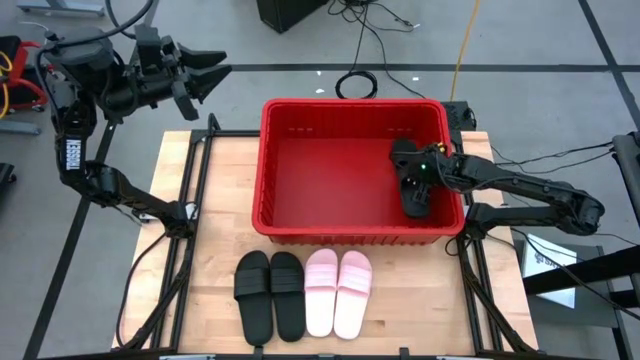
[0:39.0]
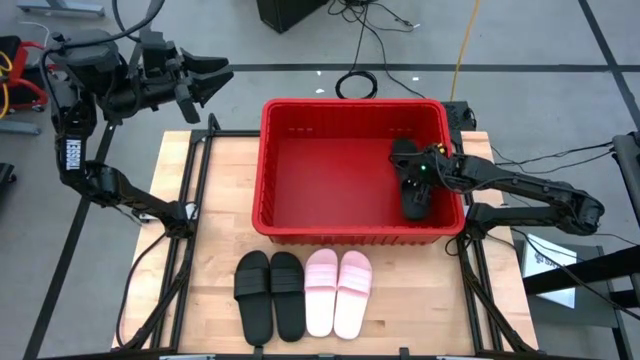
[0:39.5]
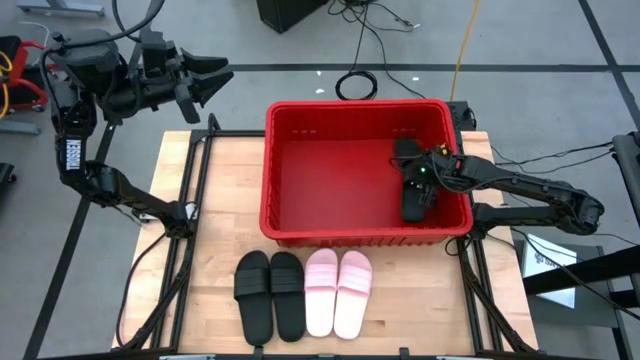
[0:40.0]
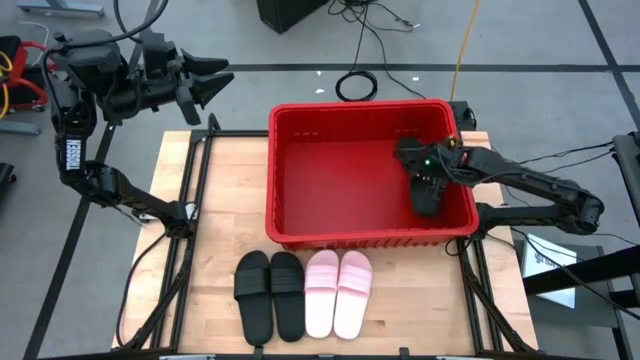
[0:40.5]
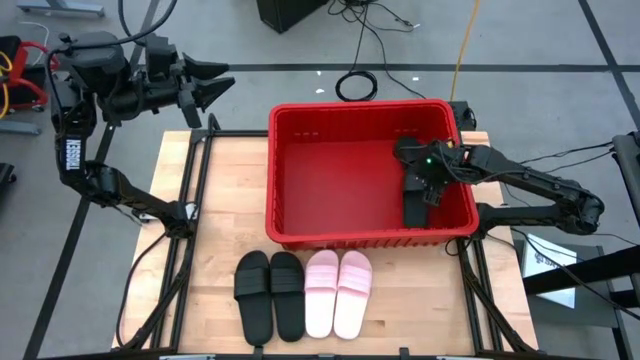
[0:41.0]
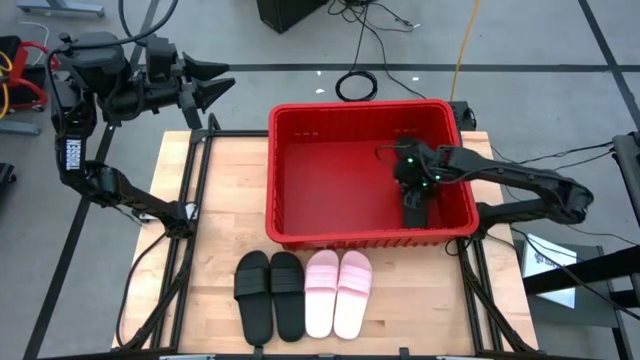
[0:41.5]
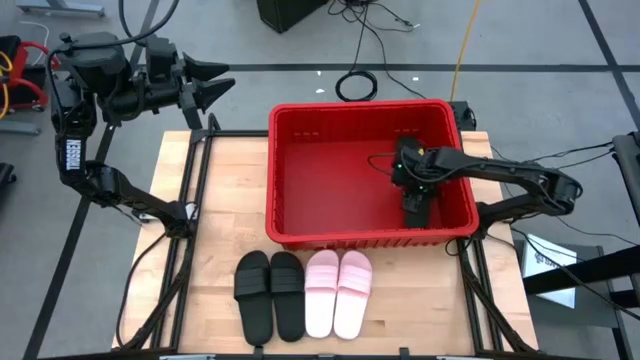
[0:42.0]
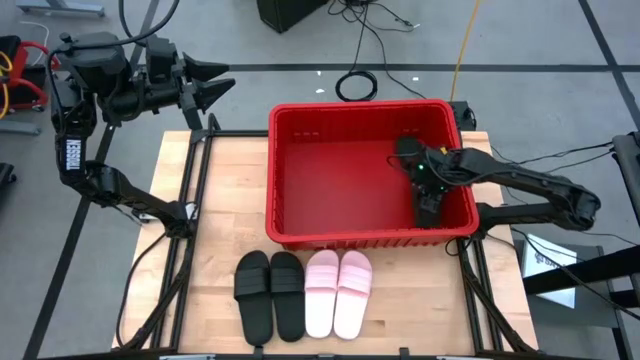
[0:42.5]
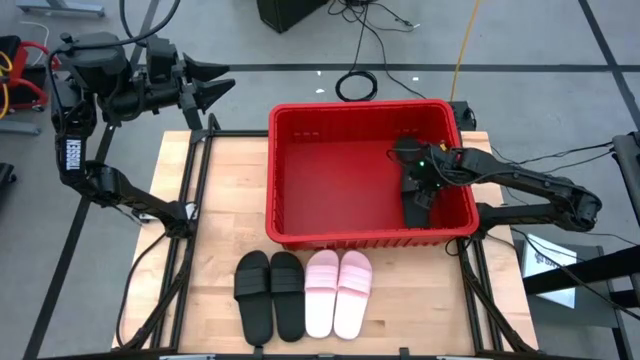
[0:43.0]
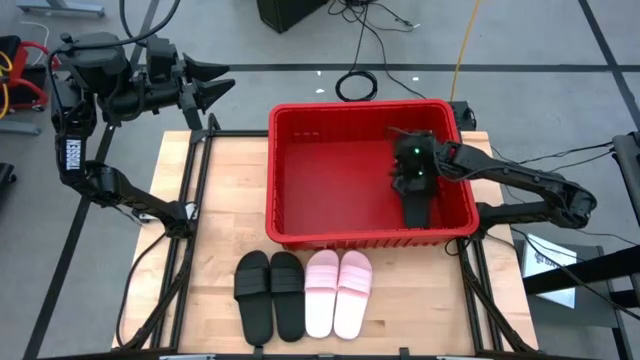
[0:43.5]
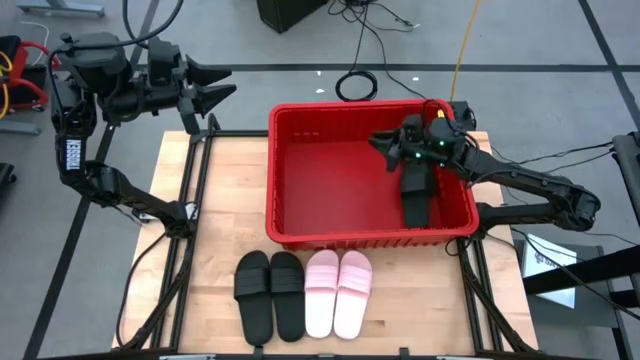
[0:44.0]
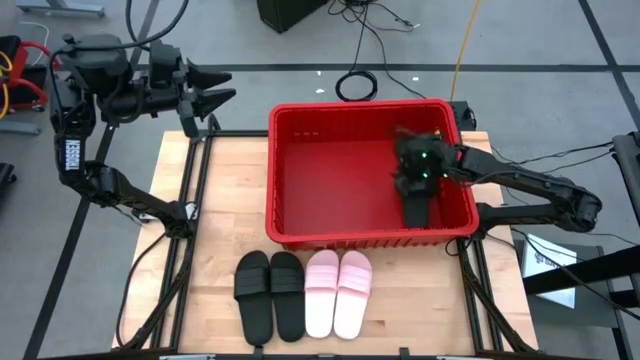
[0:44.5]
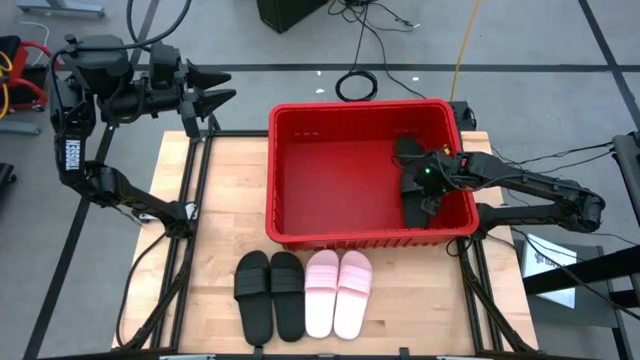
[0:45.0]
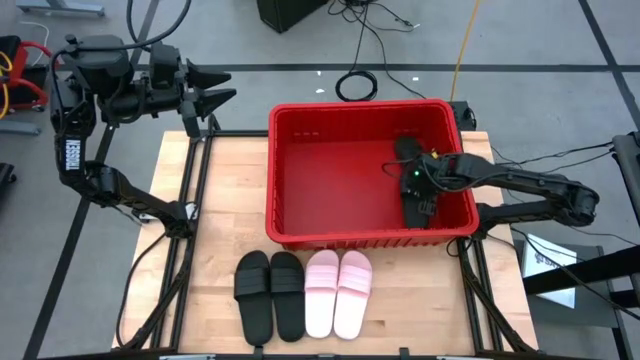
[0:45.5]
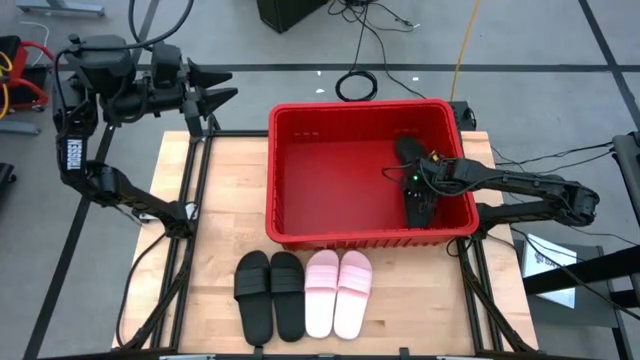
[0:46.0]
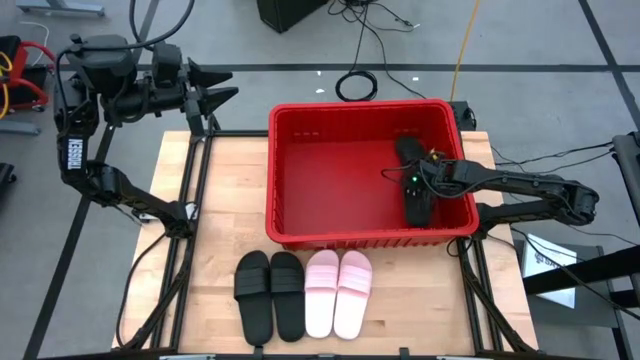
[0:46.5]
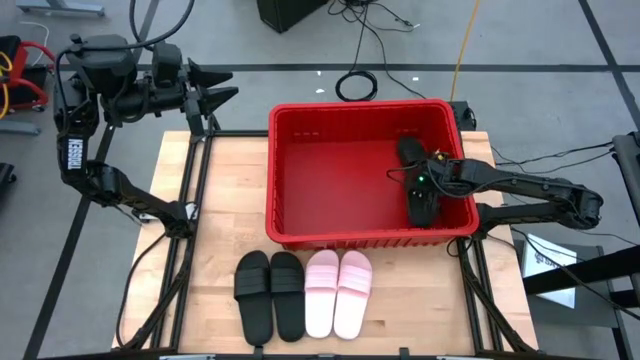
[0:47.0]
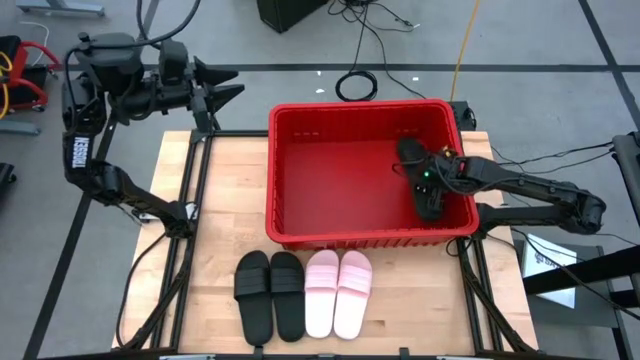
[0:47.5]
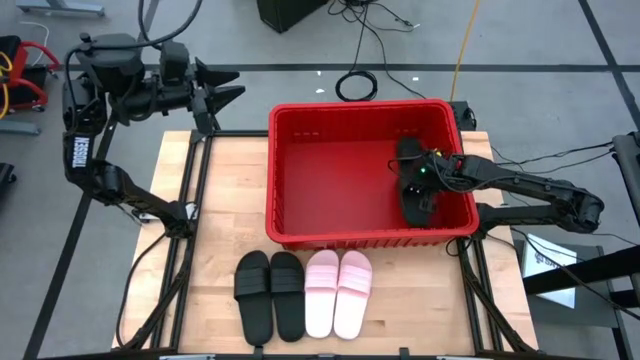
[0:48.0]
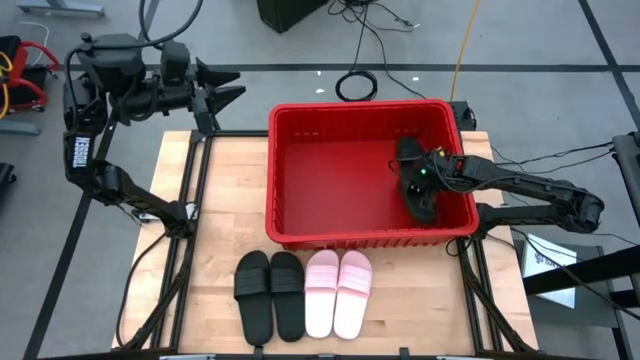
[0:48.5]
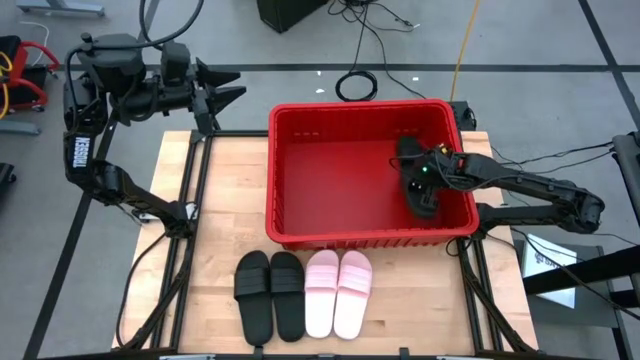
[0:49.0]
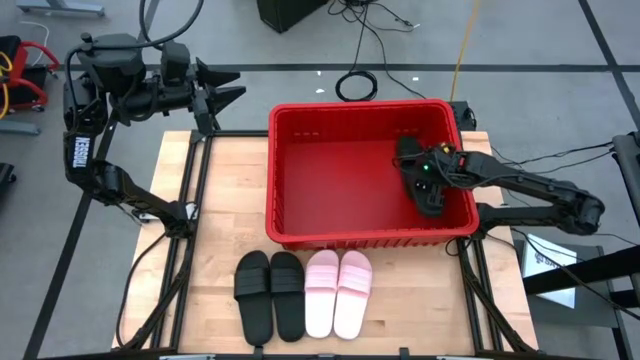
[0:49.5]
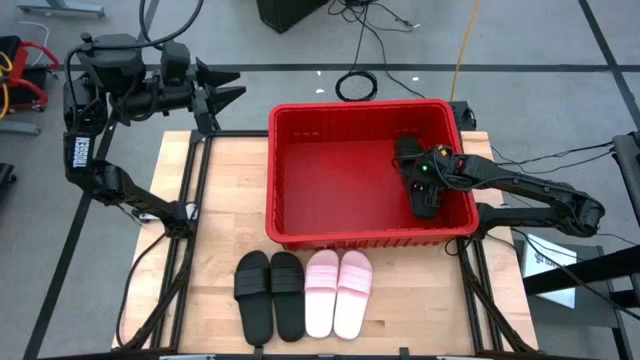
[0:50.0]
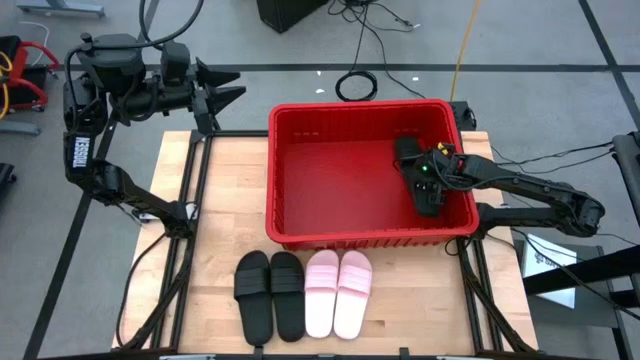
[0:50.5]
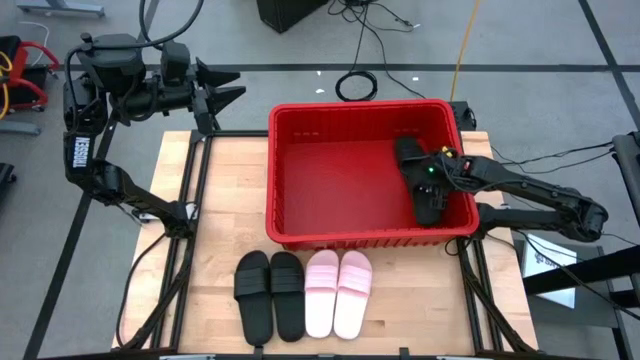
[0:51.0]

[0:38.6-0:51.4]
Task: Pick and place slides into bin
Put the black slipper into the red bin
